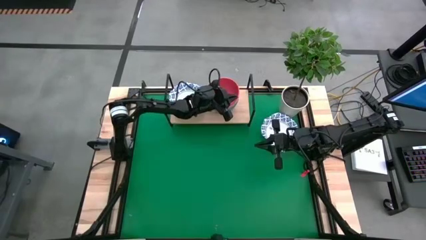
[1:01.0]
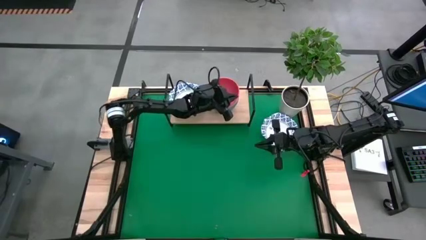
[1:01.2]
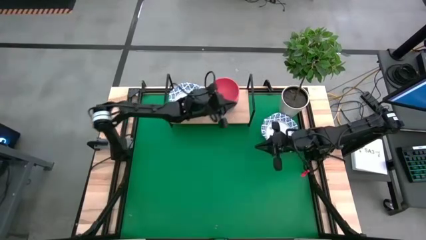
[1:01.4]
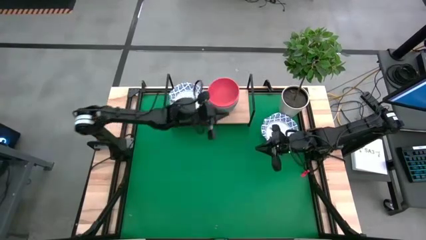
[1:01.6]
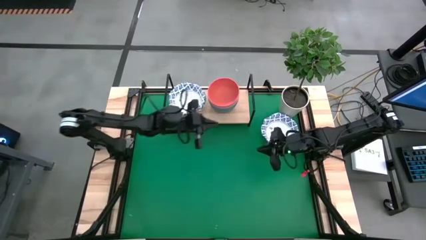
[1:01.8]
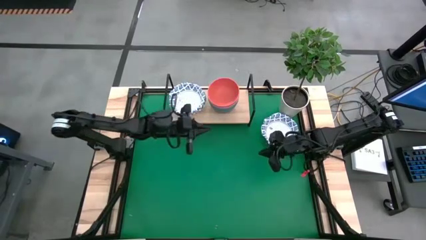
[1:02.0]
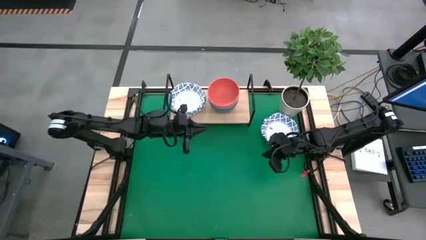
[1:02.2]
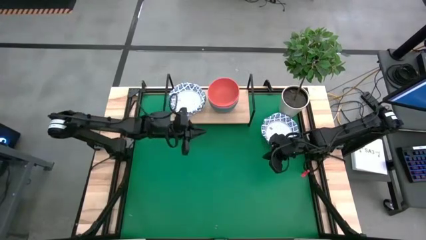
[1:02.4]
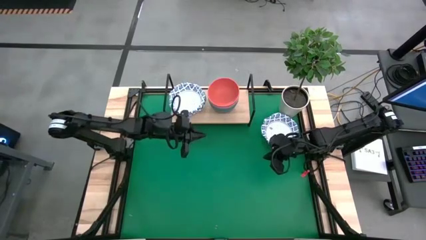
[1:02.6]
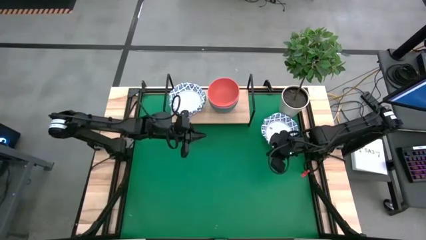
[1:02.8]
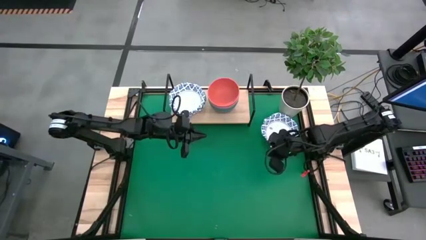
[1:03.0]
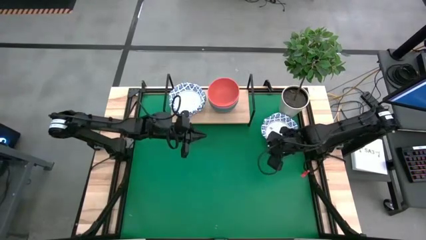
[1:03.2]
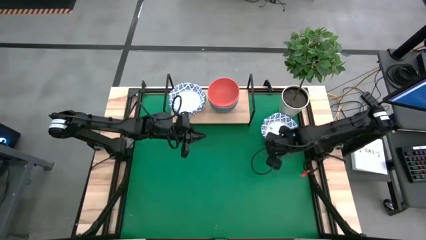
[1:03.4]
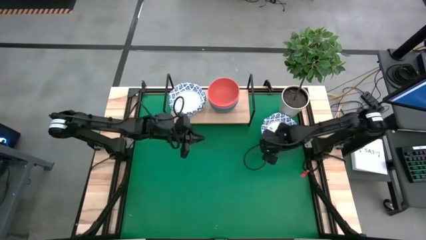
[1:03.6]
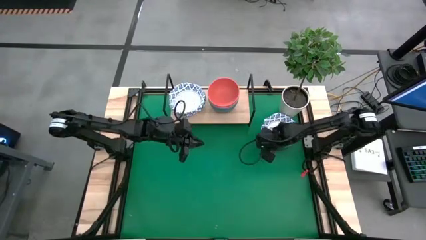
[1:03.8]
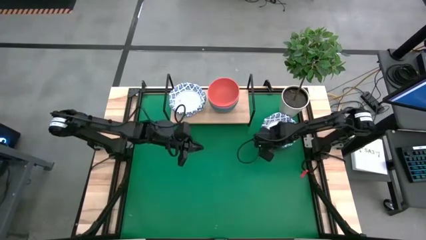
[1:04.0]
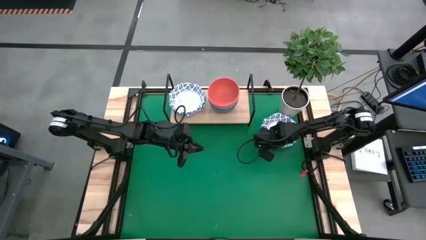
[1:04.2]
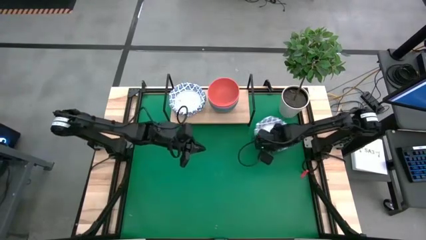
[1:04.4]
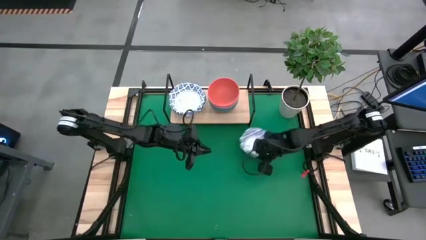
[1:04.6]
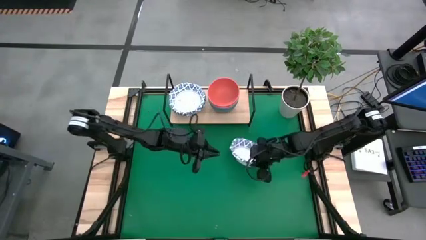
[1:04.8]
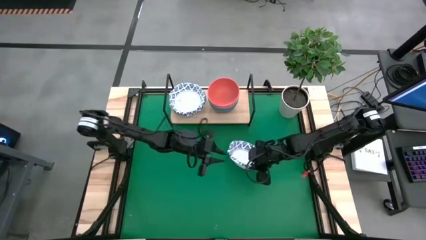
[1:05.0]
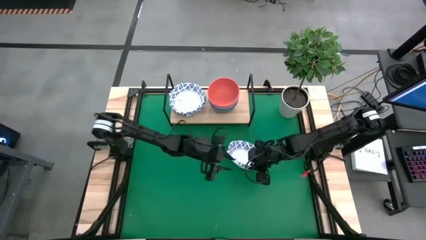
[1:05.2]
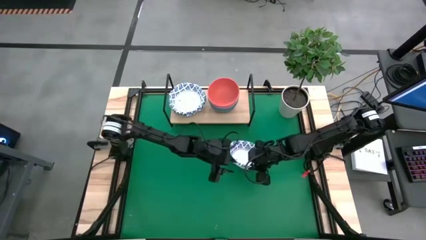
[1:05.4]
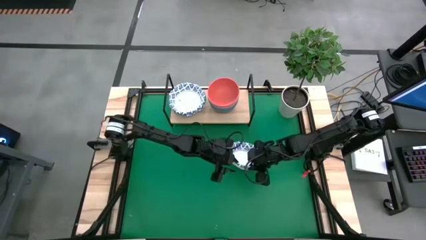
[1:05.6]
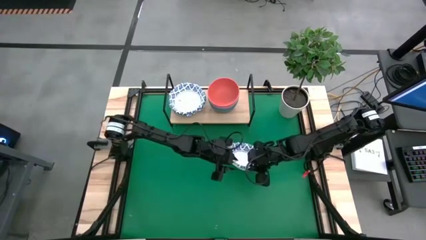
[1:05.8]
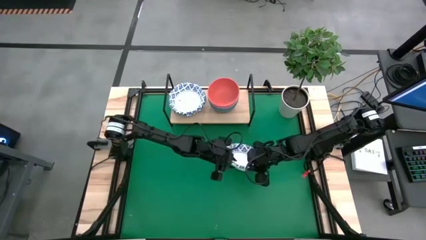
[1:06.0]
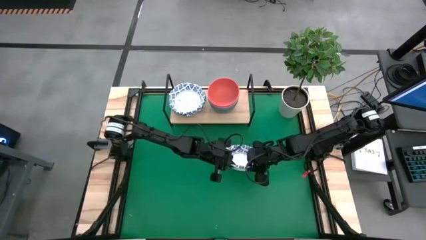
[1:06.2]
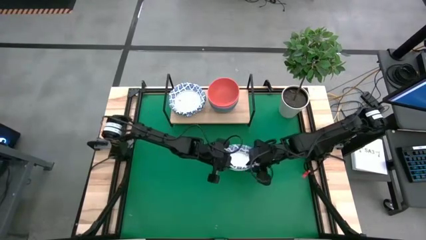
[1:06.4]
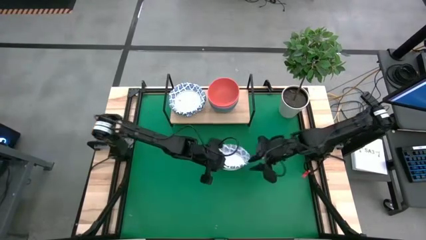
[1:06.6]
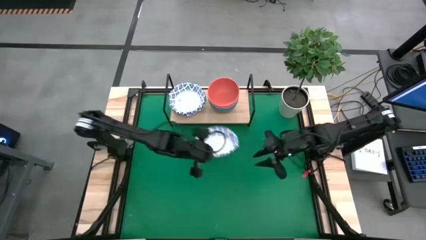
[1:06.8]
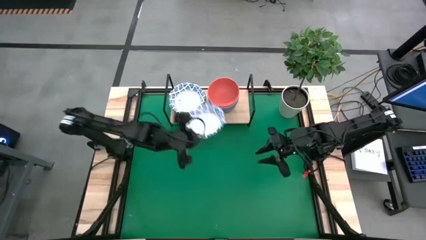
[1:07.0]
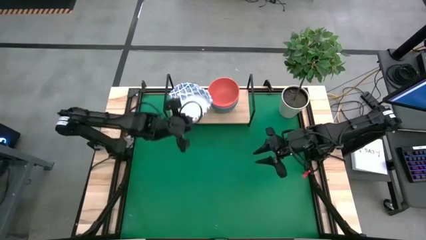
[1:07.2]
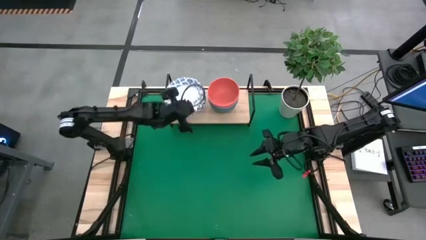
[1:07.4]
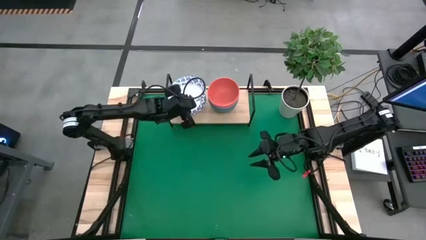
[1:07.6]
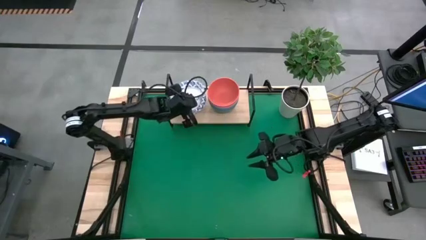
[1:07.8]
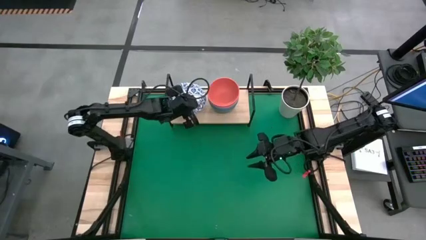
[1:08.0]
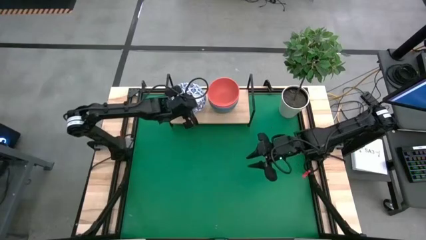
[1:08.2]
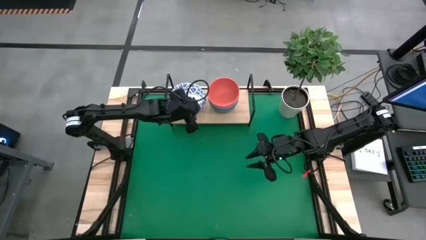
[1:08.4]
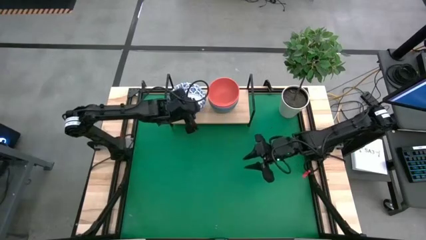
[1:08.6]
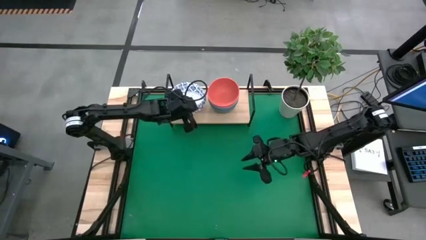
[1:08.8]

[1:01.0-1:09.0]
Task: Place and stack bowls onto a shelf
Stack the white patterned bowl on top of the white patterned bowl on the shelf

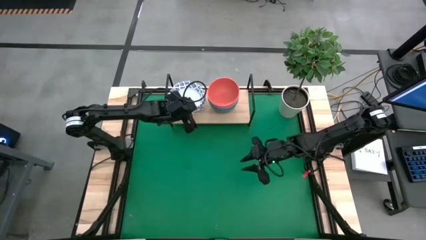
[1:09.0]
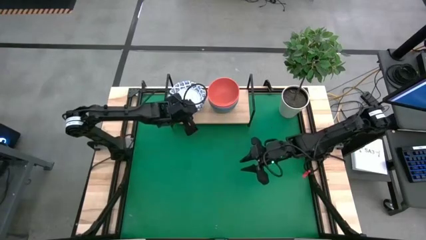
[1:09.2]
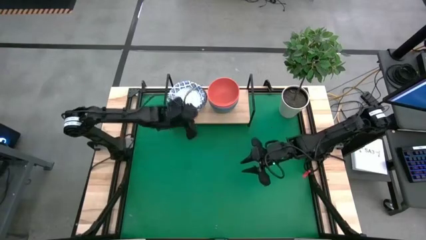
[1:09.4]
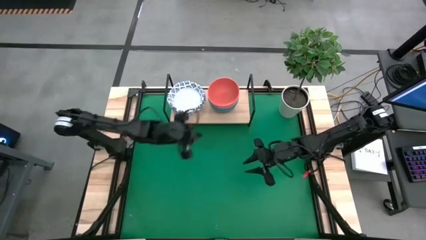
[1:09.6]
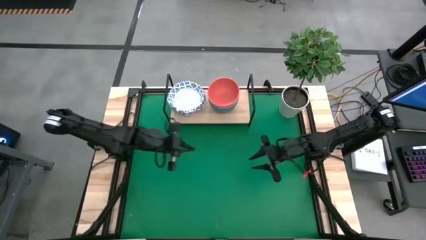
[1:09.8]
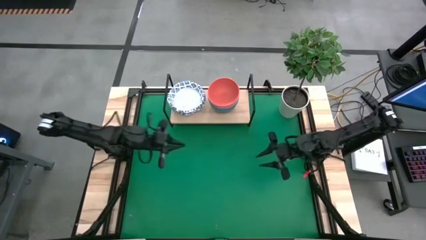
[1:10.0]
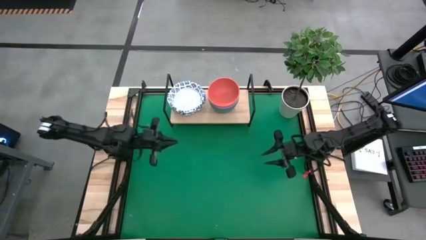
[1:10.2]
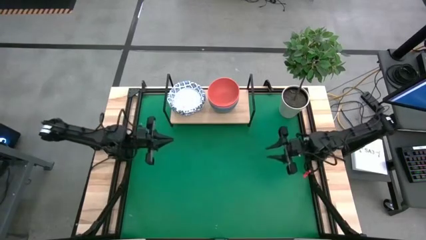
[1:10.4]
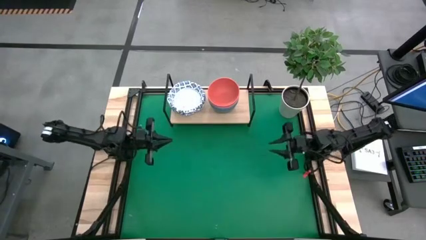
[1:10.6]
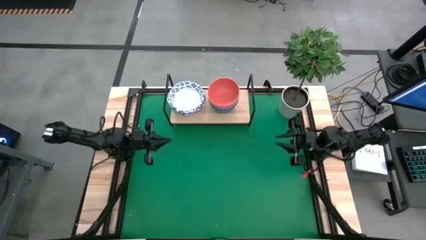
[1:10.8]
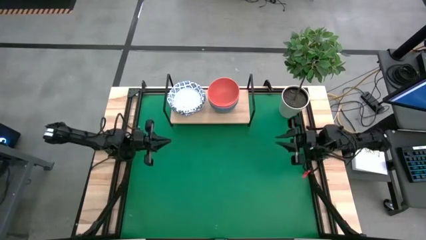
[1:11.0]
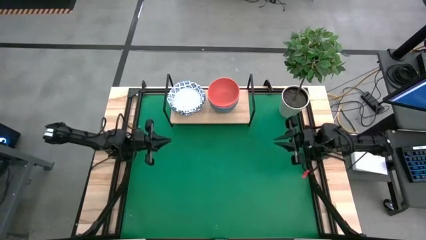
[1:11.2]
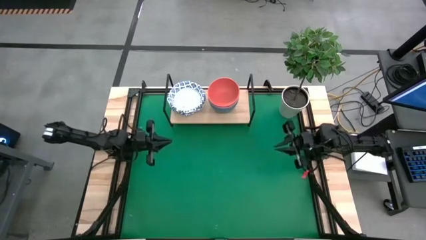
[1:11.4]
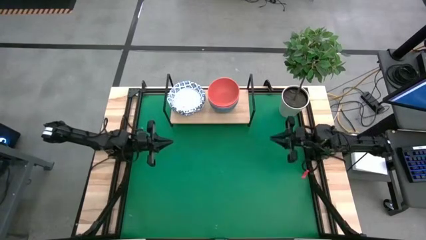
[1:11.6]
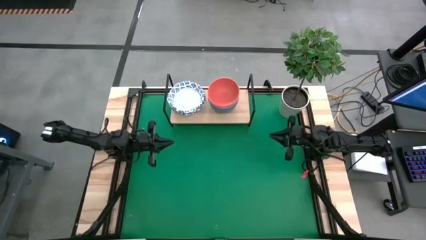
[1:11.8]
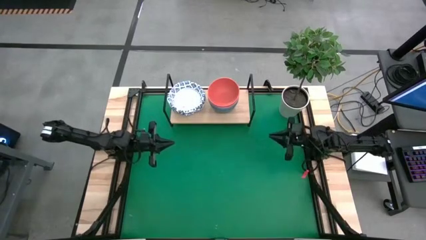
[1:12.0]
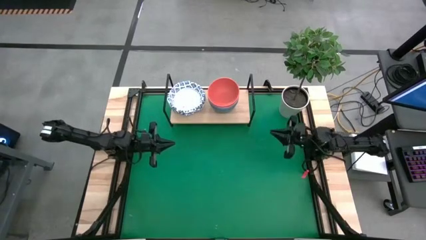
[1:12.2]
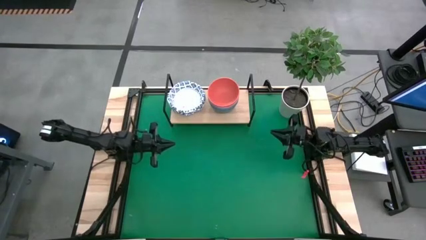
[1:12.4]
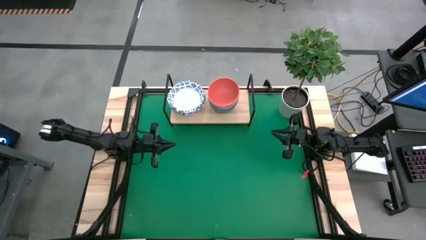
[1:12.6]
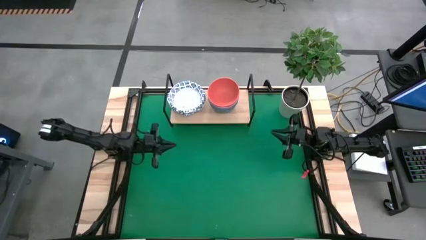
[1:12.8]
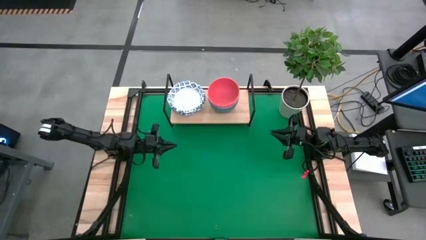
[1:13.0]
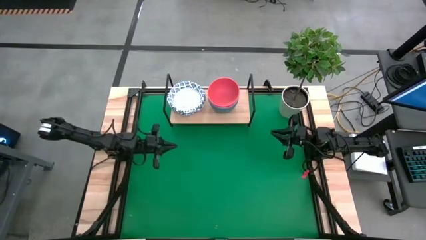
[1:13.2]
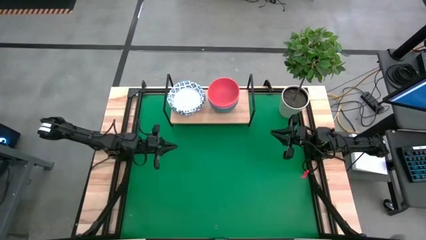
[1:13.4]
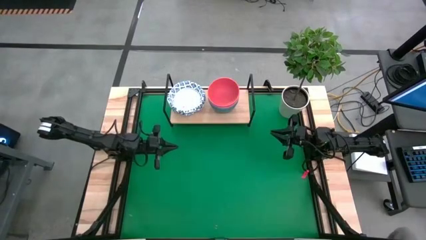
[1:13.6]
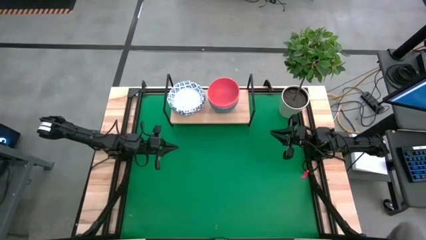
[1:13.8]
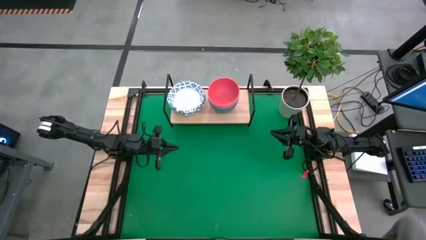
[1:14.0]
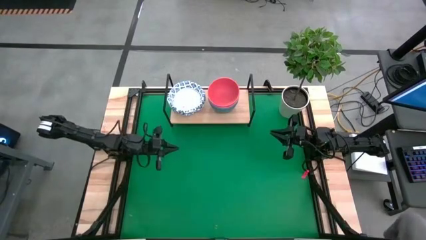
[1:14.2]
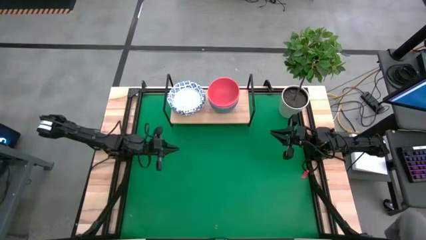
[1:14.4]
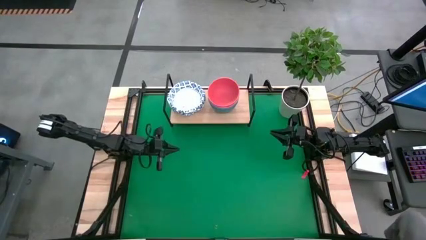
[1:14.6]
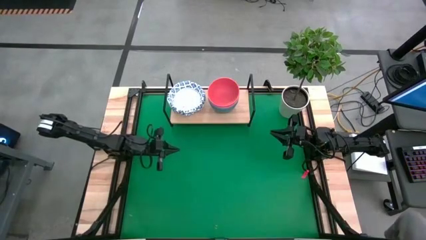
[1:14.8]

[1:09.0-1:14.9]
Return to Home Position
